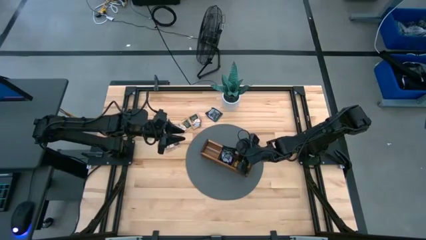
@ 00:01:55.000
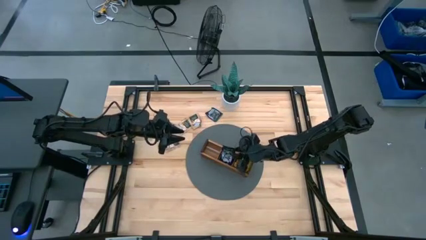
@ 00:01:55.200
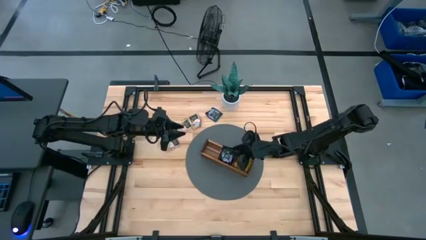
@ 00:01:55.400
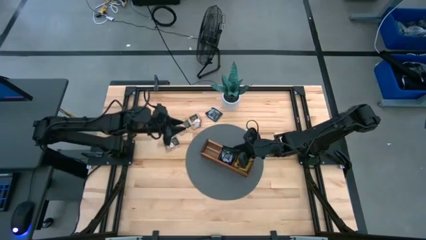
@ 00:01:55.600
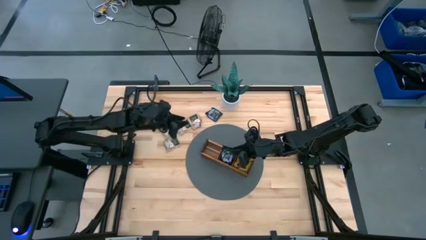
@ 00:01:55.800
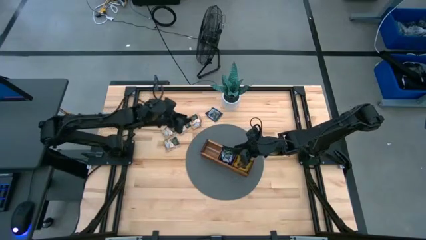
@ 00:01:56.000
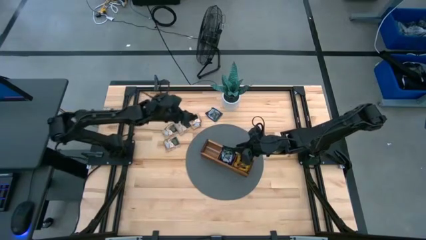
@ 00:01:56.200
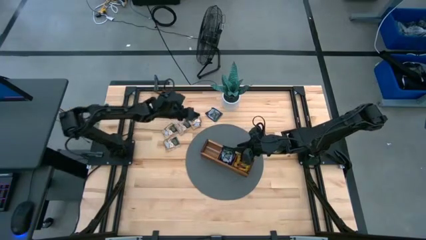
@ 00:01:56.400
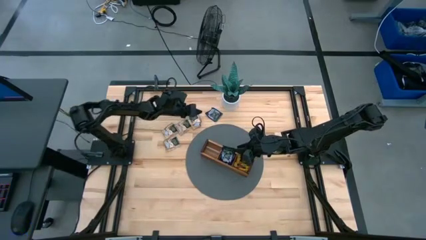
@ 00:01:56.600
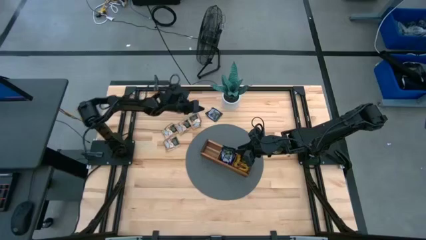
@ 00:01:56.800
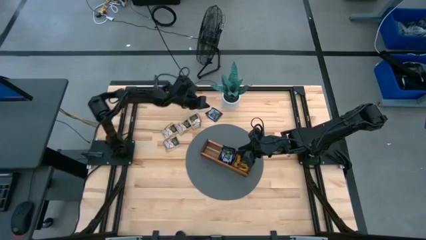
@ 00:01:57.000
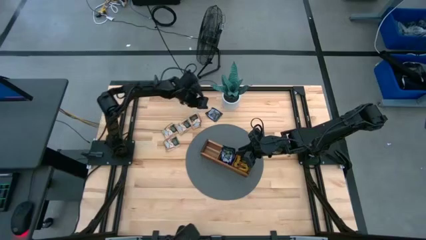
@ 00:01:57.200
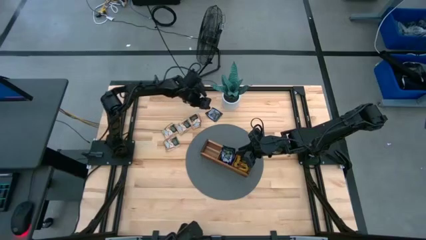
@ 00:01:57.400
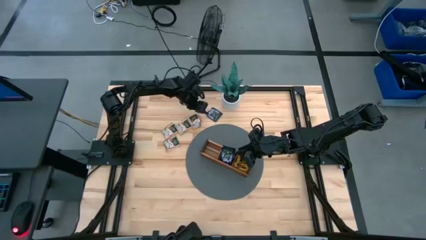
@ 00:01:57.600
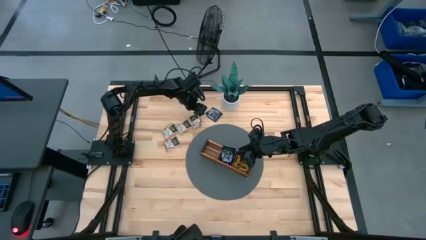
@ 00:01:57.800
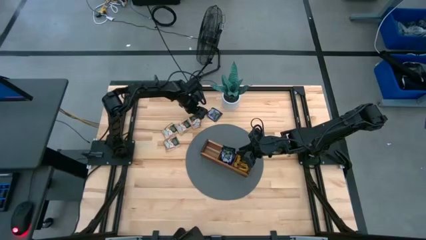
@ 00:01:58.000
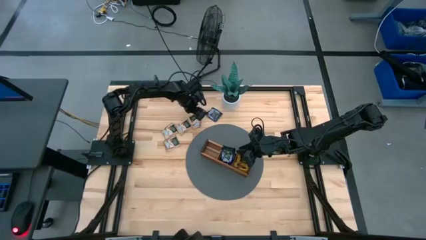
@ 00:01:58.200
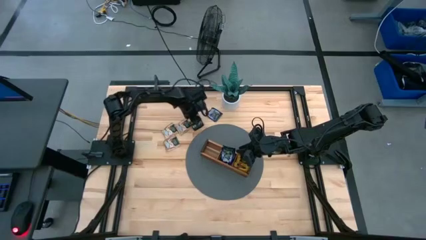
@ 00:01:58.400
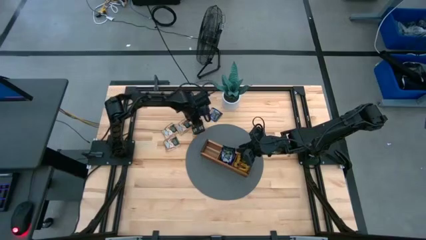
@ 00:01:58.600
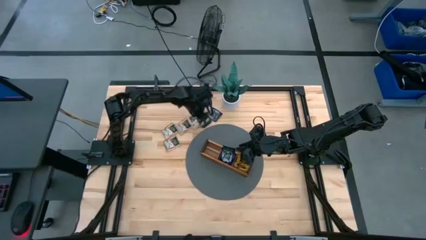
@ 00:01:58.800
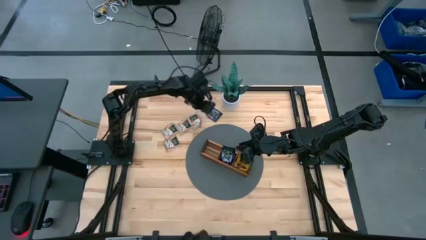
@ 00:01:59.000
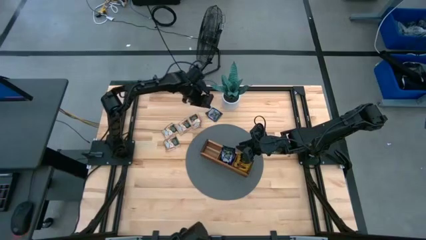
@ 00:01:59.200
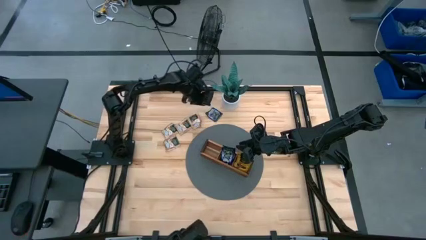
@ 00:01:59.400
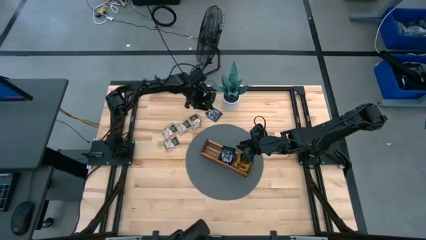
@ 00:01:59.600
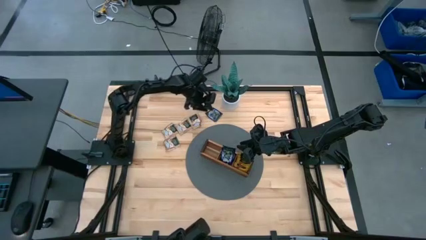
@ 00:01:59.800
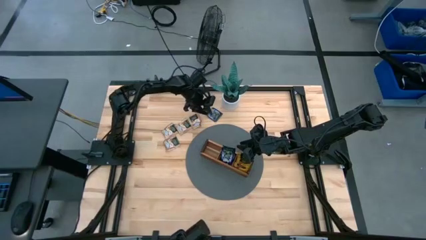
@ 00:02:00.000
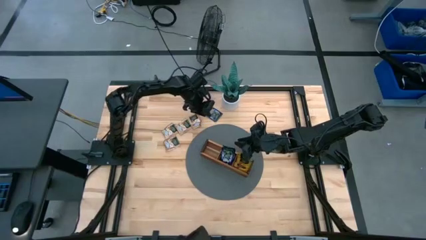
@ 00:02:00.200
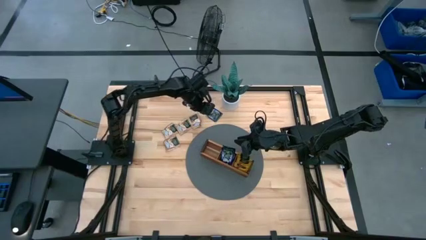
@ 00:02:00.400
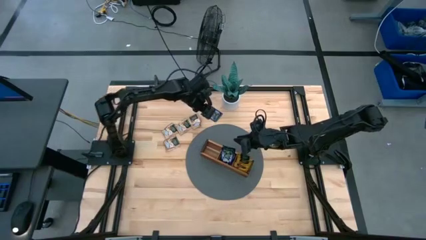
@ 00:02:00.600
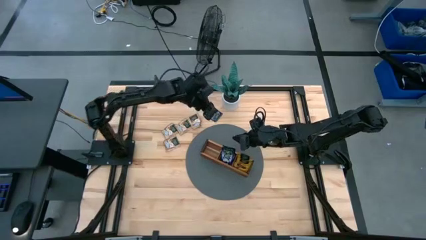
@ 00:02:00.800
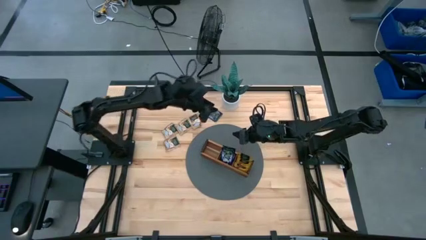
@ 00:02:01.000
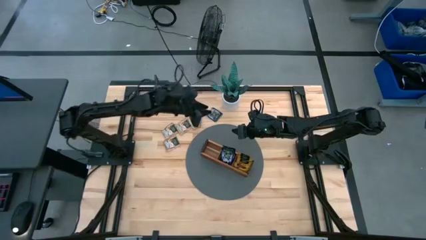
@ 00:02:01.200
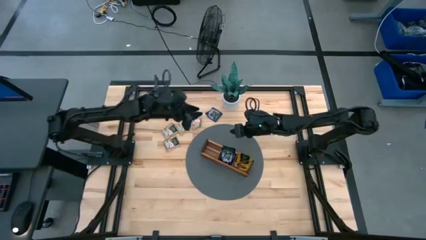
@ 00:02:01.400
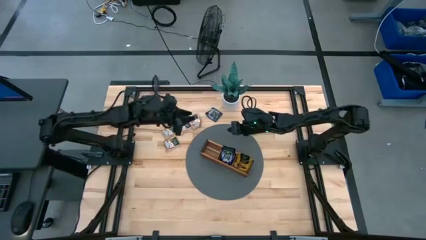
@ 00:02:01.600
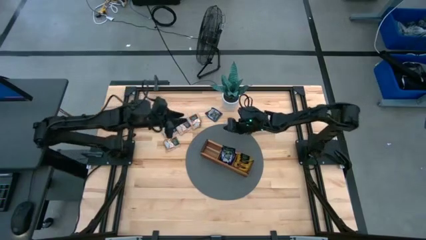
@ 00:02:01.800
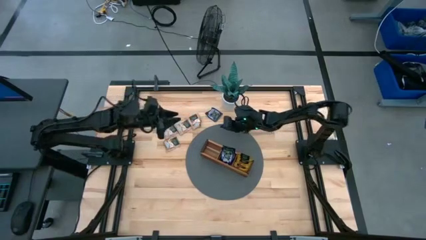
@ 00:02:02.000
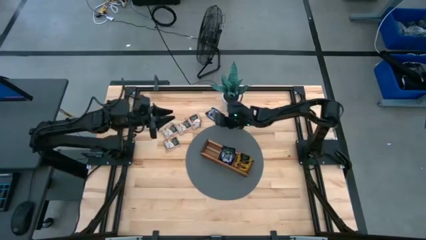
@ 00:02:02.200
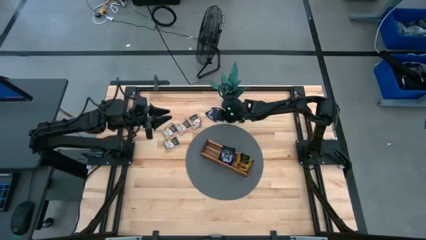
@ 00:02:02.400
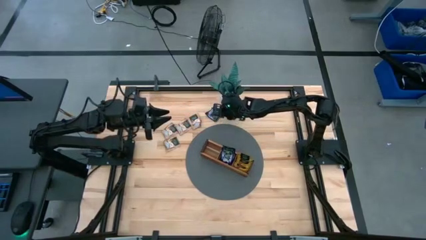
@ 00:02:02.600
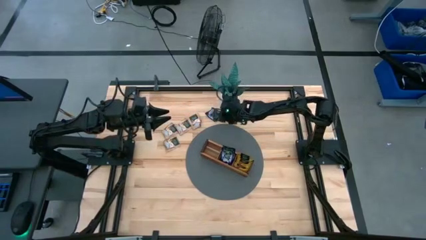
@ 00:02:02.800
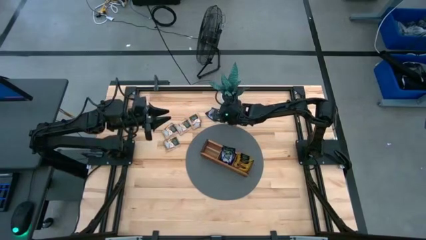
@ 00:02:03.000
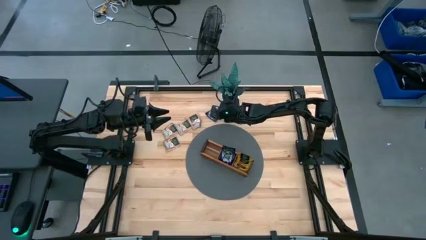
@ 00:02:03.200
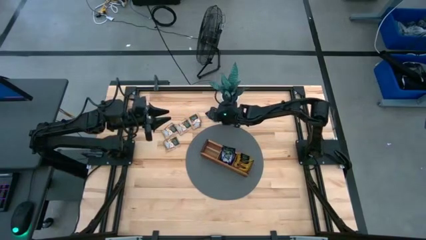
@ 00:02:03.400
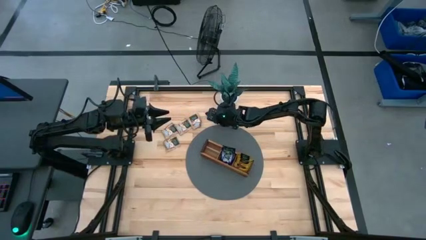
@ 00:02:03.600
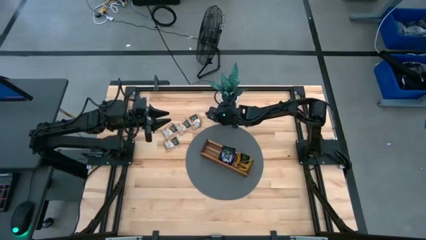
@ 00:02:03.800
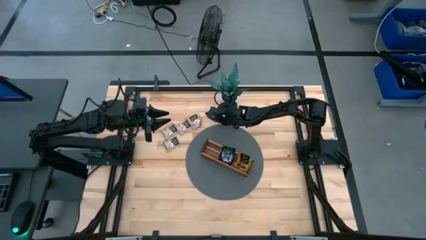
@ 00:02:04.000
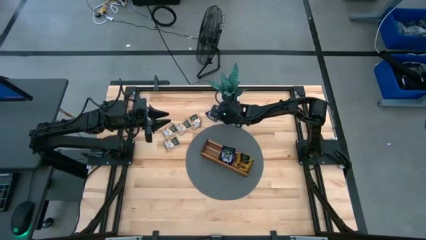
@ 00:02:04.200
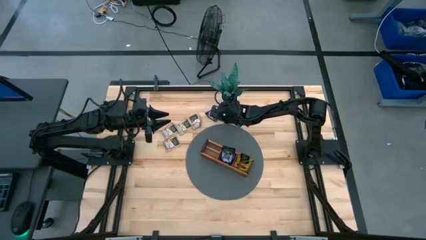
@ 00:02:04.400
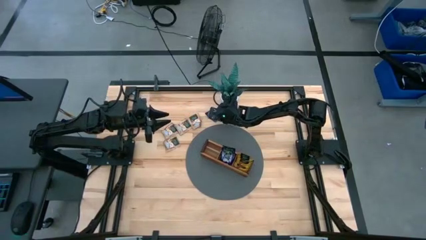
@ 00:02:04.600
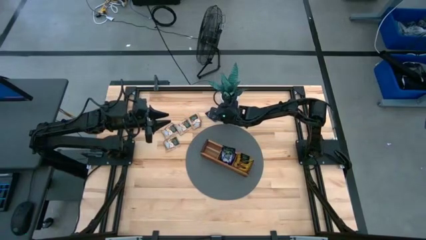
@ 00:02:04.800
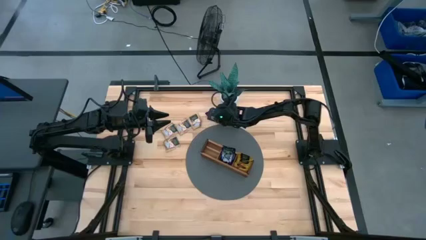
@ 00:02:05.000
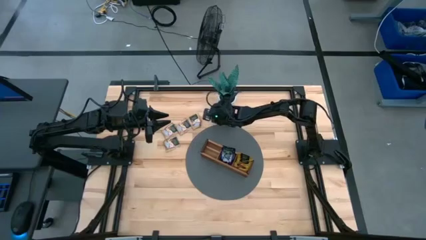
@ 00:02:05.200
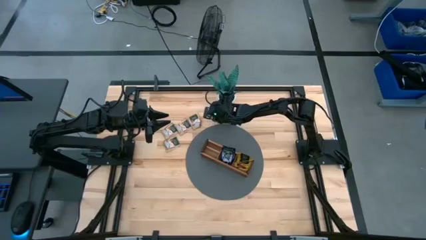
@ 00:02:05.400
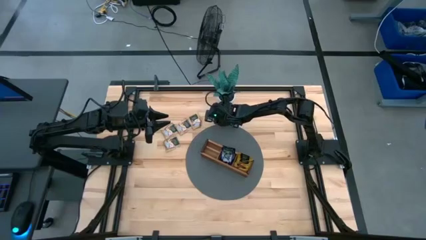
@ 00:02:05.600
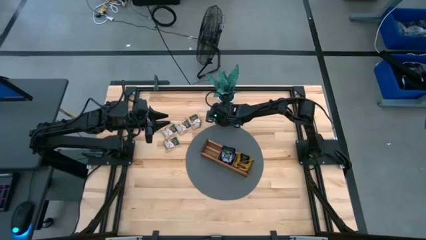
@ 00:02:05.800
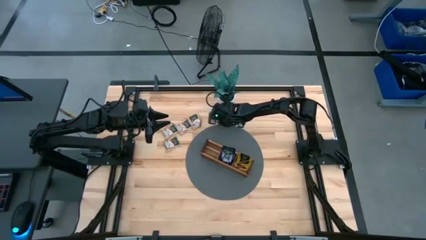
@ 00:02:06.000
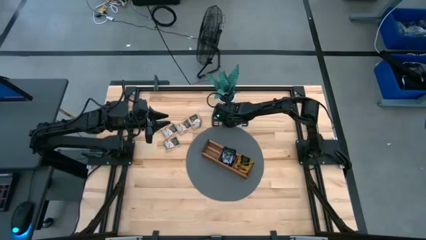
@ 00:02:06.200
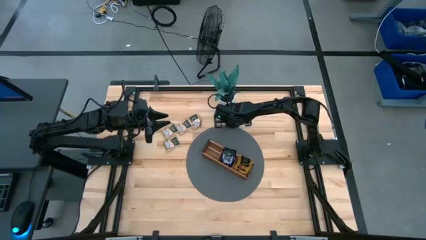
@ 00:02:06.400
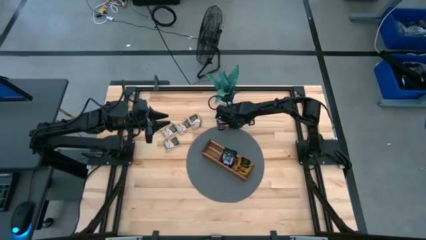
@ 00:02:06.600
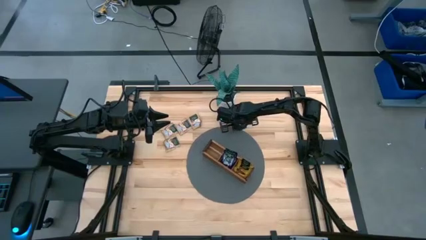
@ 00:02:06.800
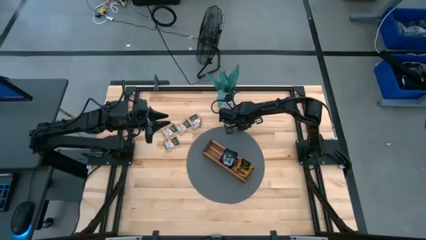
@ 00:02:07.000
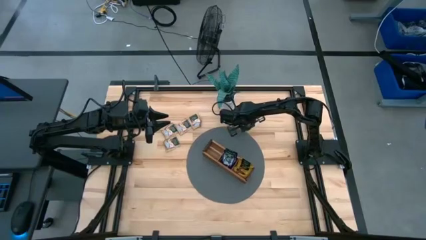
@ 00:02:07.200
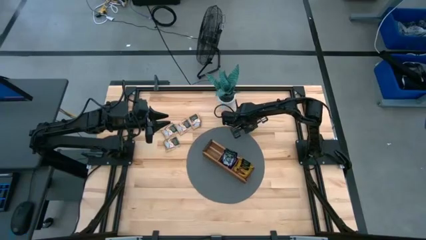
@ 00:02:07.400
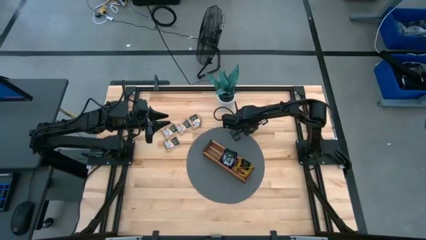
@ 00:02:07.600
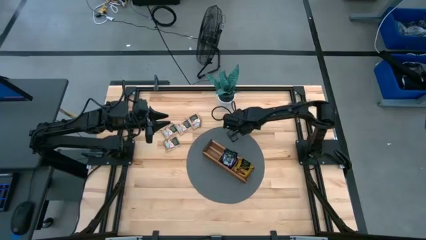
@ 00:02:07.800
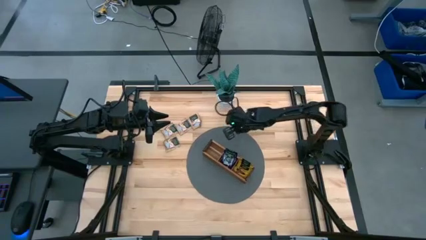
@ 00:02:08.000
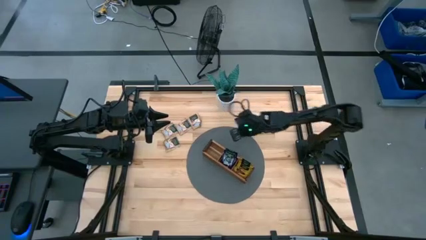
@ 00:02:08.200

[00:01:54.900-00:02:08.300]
Task: Pick & Place Tea
Put the violet tea bag into the middle section of the wooden organizer

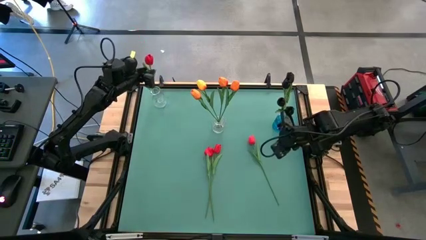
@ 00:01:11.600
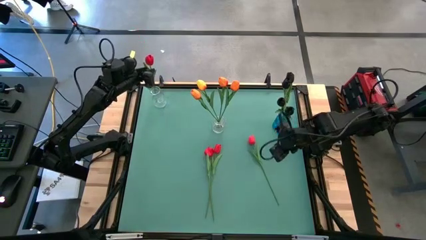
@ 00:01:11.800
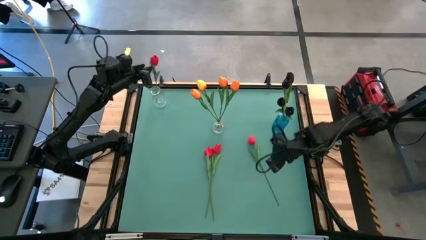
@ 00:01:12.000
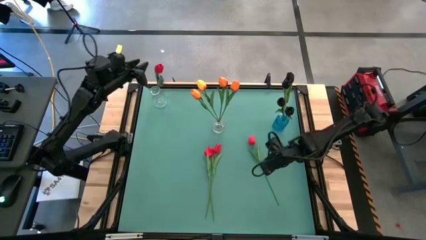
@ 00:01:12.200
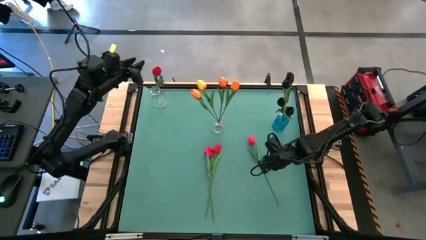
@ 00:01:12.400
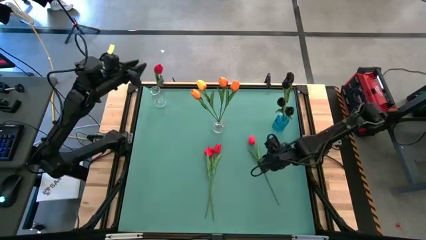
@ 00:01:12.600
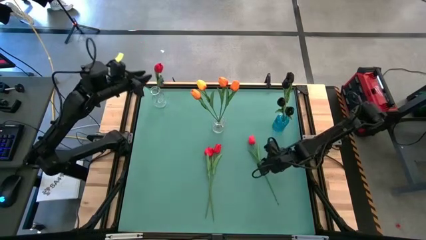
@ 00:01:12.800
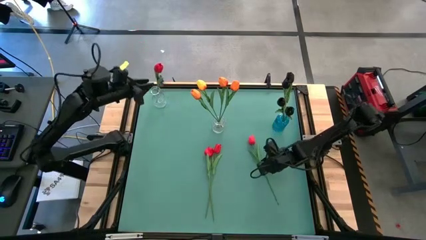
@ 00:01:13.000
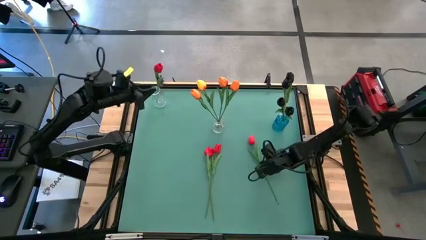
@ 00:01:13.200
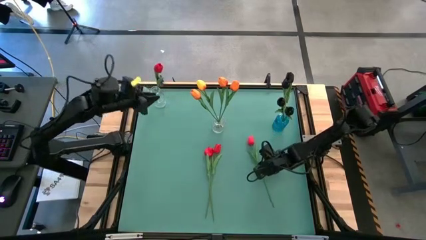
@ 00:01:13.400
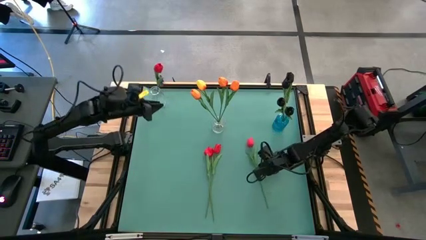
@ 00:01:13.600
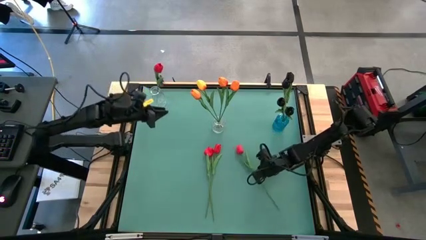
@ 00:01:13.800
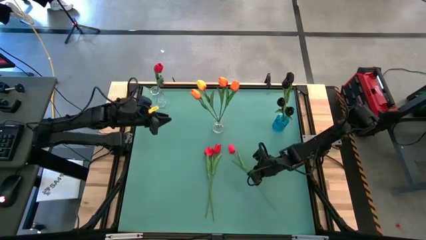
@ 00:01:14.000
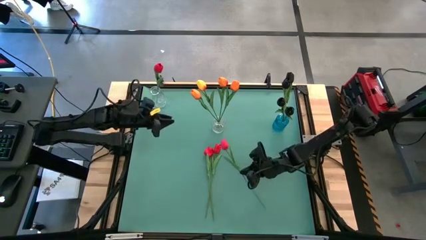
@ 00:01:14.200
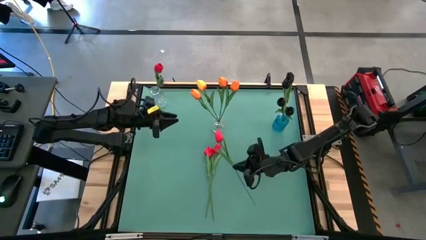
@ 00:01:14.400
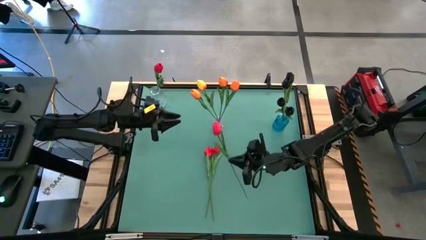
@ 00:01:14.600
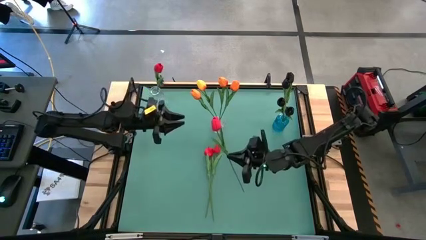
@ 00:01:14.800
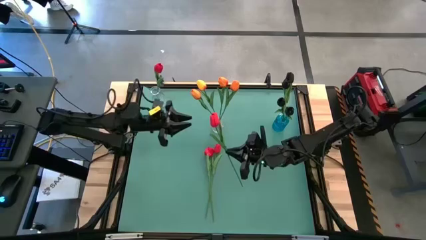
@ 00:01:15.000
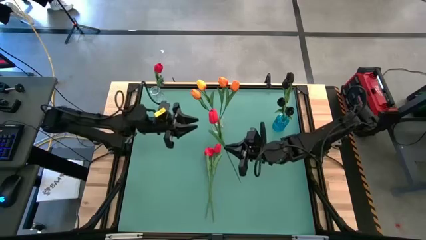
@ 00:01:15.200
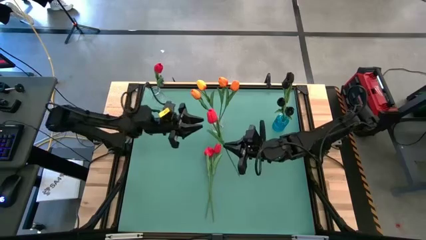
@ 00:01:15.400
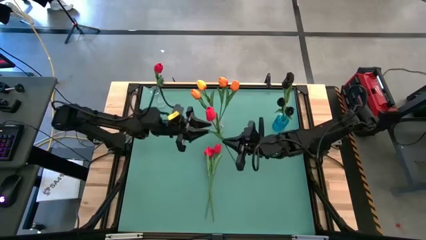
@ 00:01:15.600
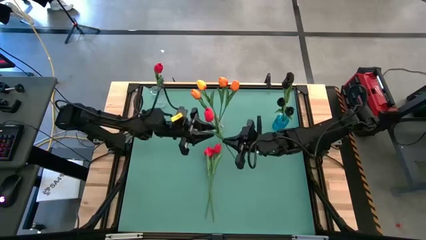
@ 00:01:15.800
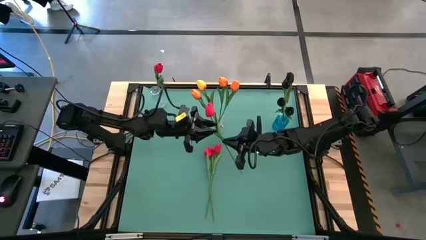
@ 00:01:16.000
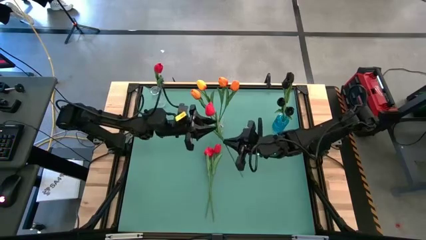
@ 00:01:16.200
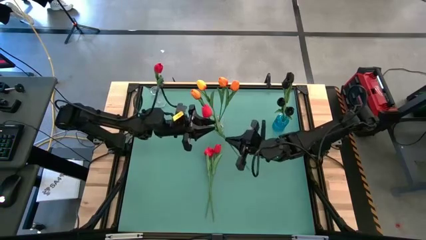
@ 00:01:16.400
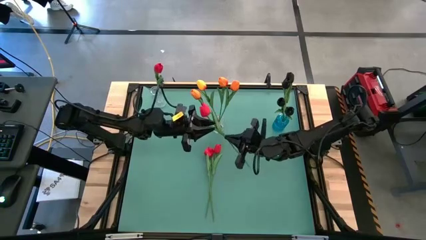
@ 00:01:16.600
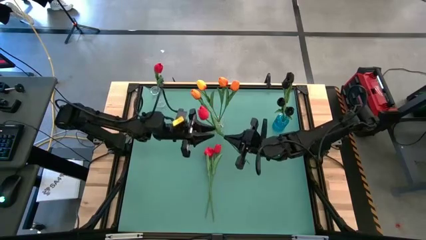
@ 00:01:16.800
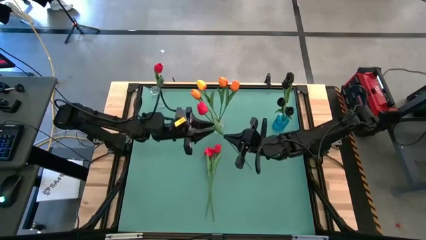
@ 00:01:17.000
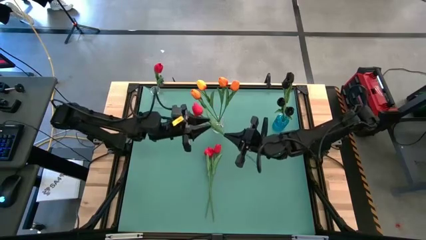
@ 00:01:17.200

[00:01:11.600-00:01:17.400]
Task: Sort flowers into vase by color
Put the pink tulip into the top left transparent vase
